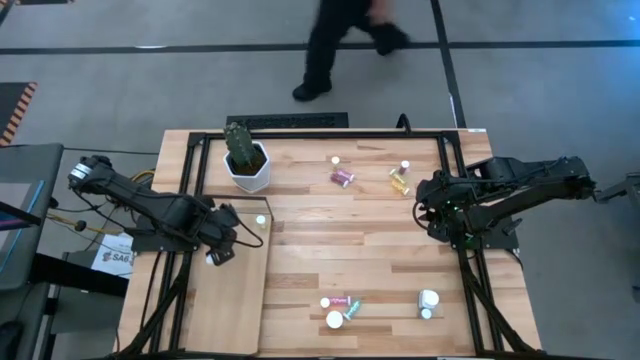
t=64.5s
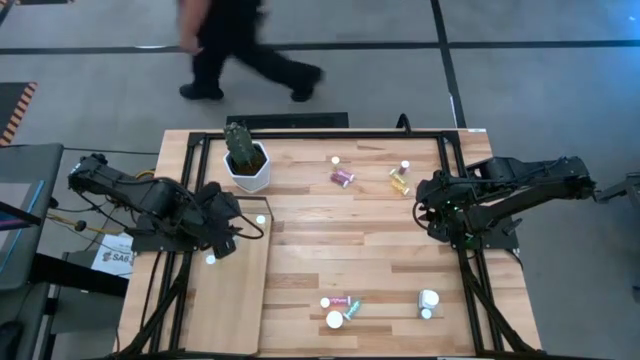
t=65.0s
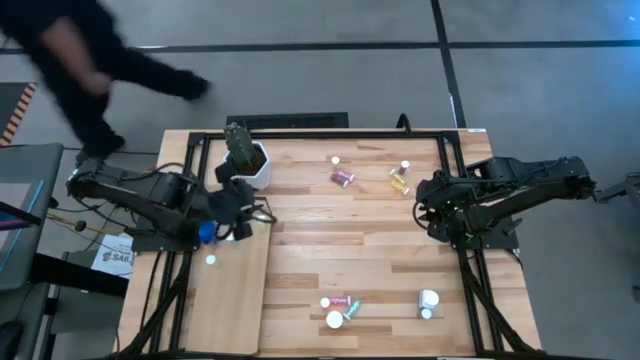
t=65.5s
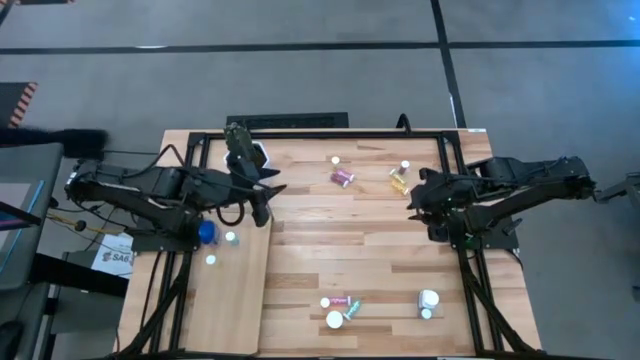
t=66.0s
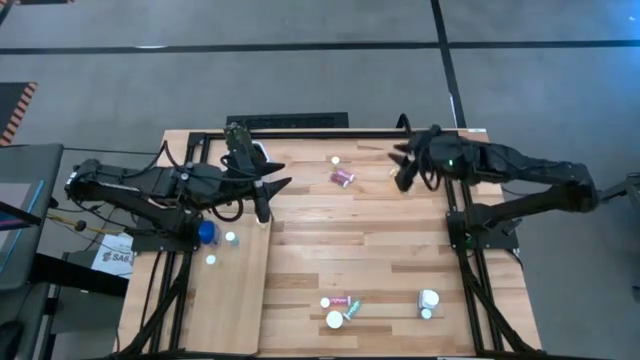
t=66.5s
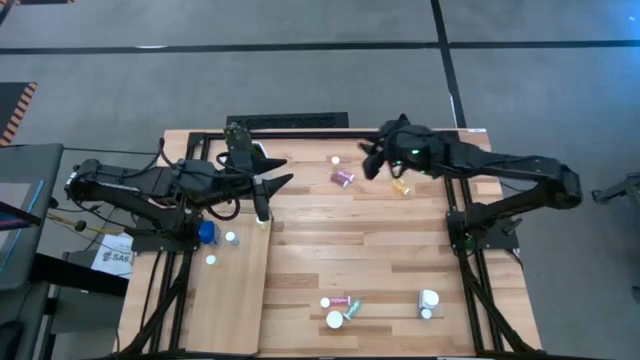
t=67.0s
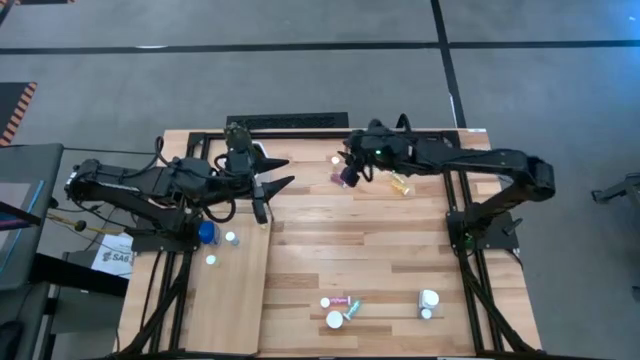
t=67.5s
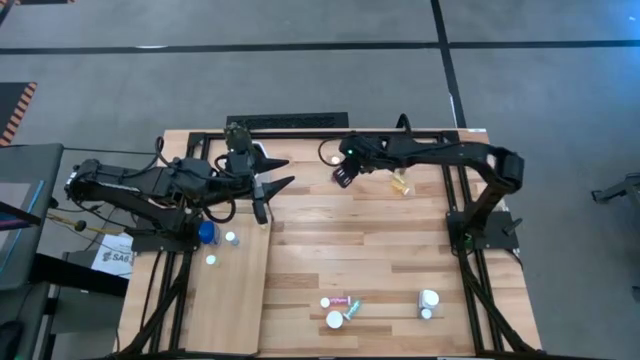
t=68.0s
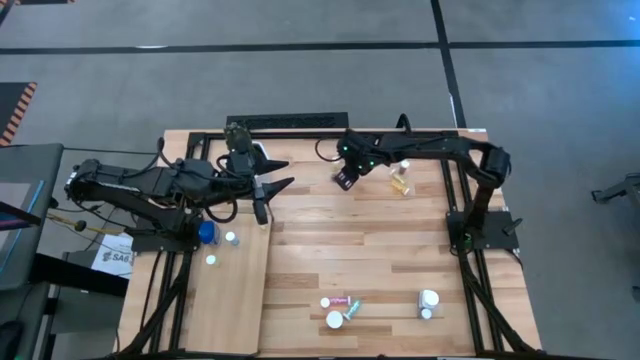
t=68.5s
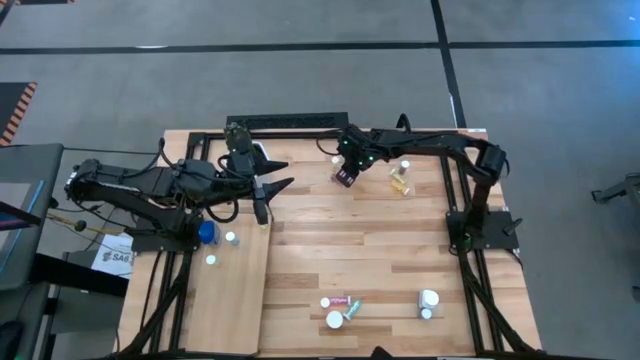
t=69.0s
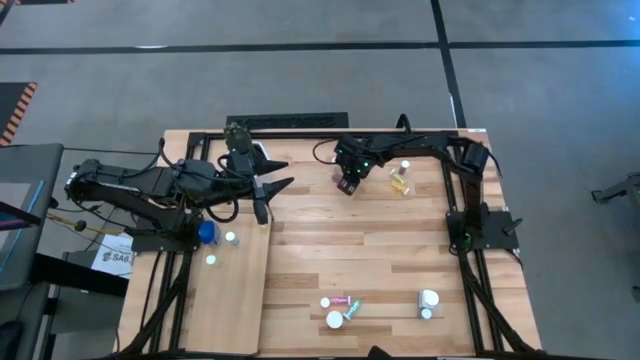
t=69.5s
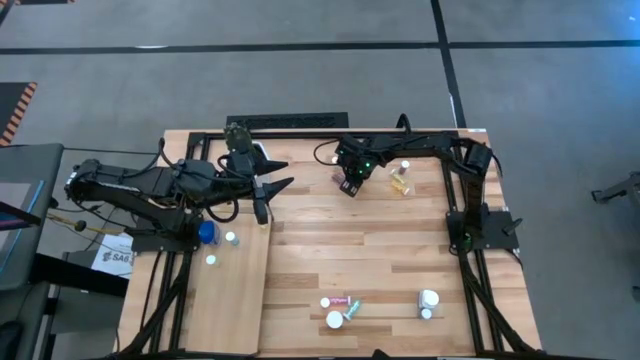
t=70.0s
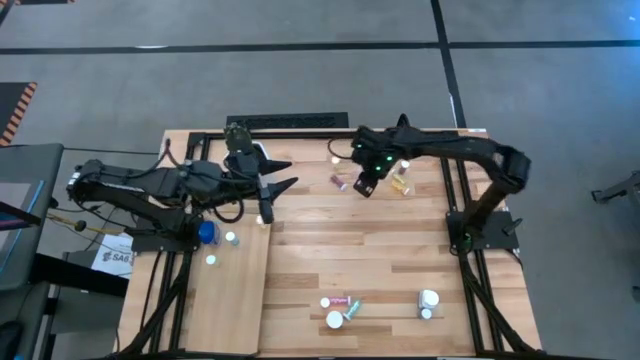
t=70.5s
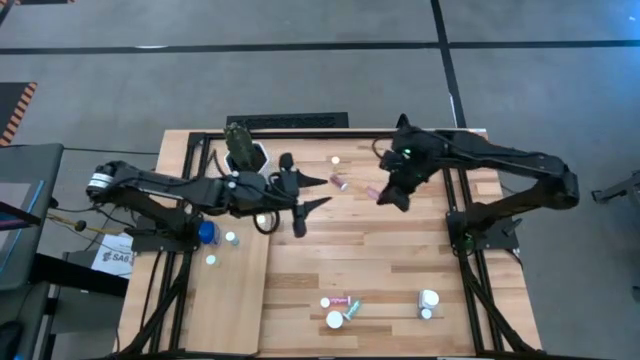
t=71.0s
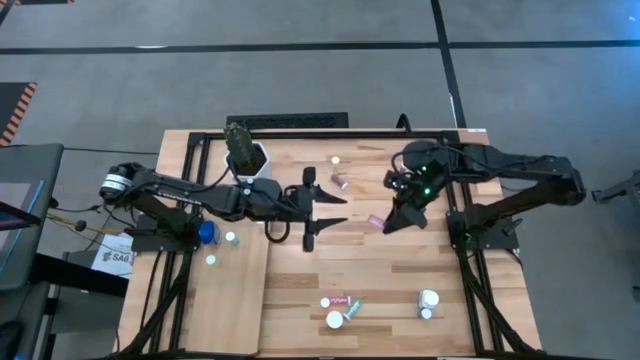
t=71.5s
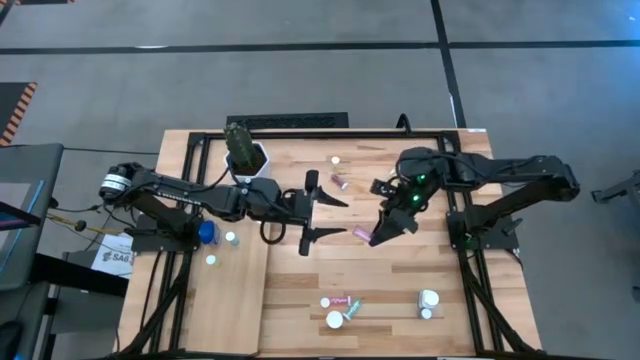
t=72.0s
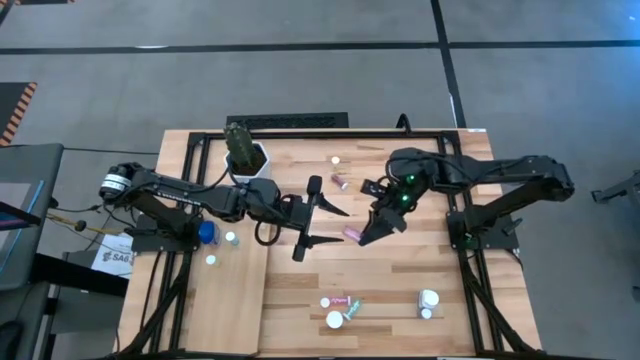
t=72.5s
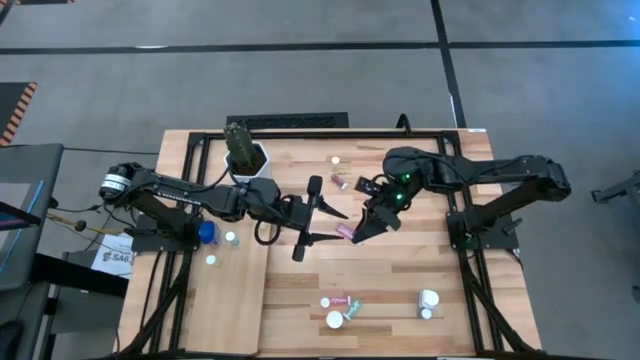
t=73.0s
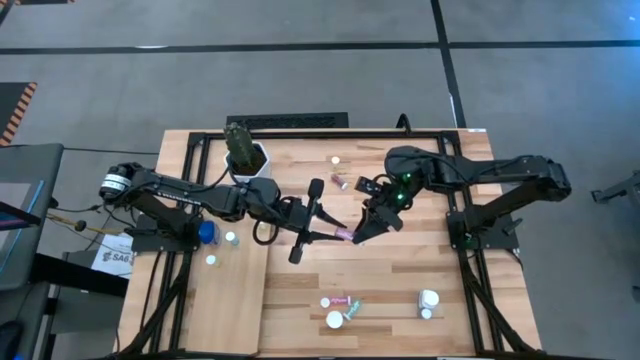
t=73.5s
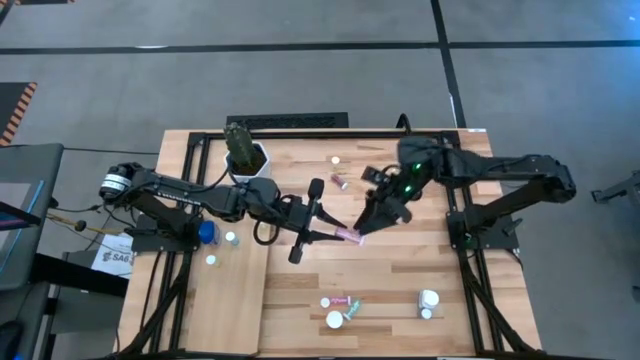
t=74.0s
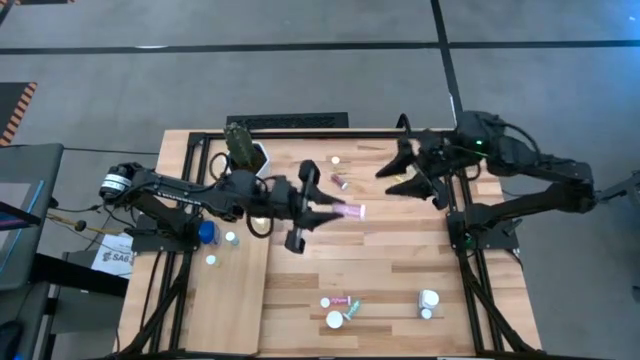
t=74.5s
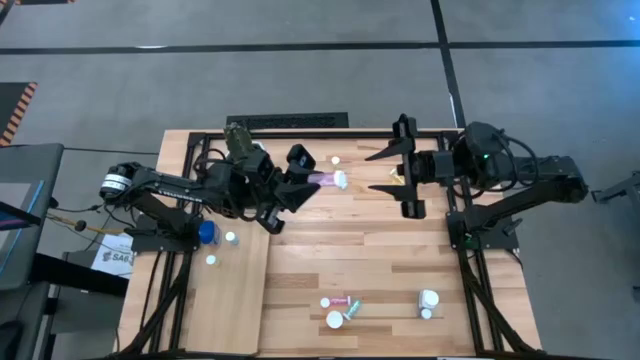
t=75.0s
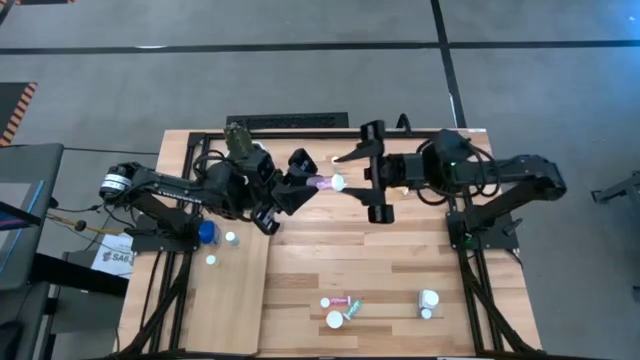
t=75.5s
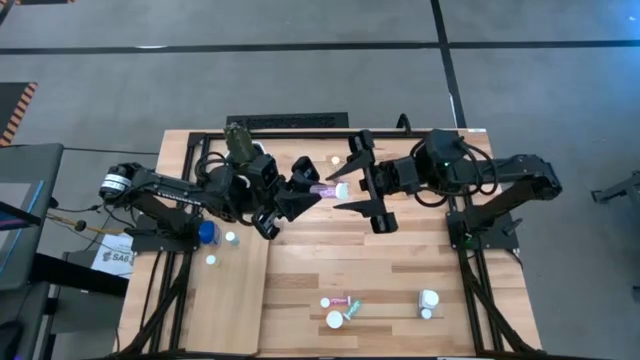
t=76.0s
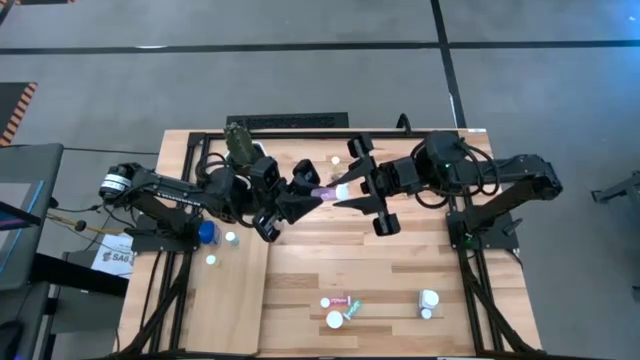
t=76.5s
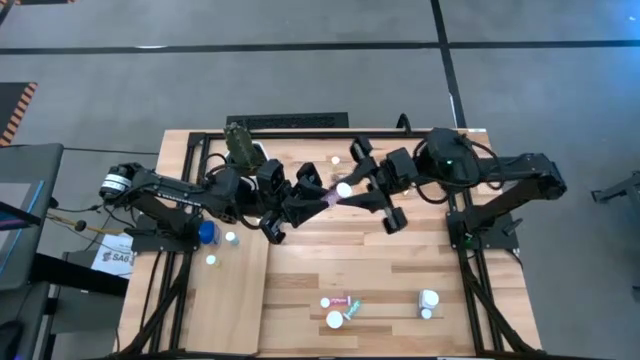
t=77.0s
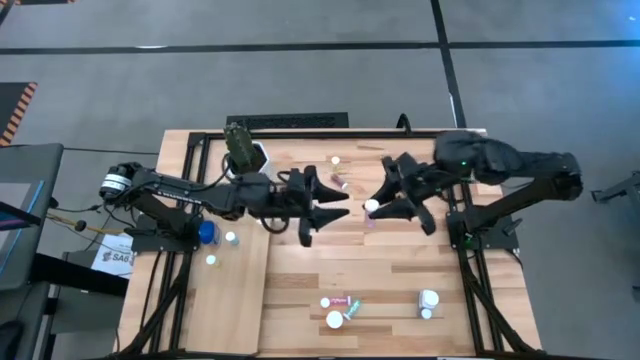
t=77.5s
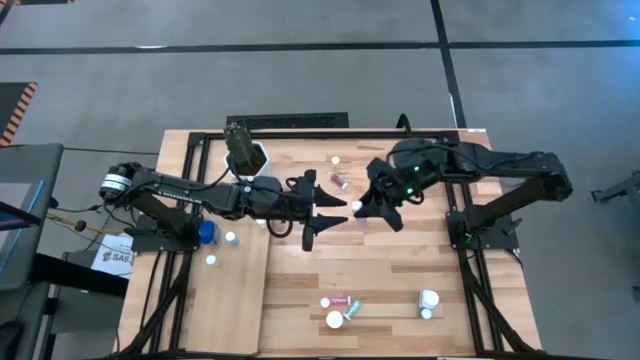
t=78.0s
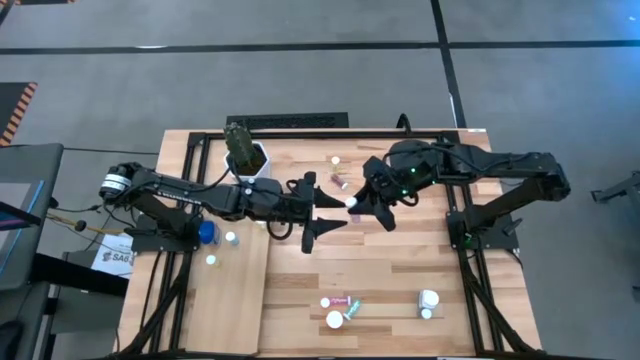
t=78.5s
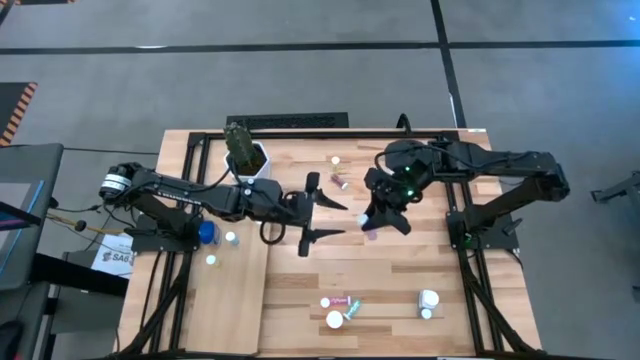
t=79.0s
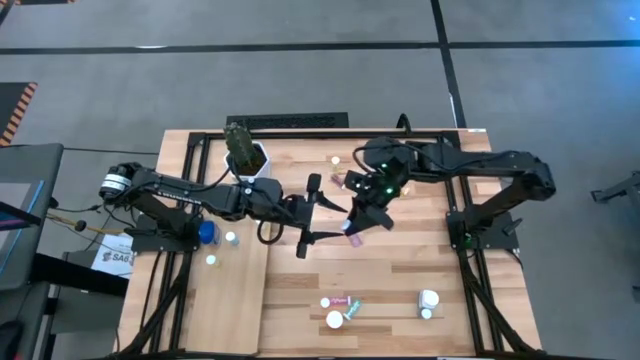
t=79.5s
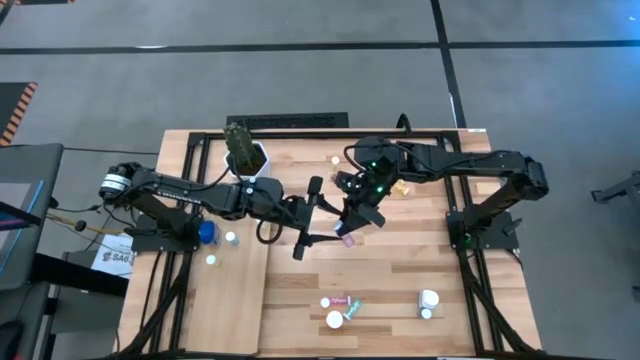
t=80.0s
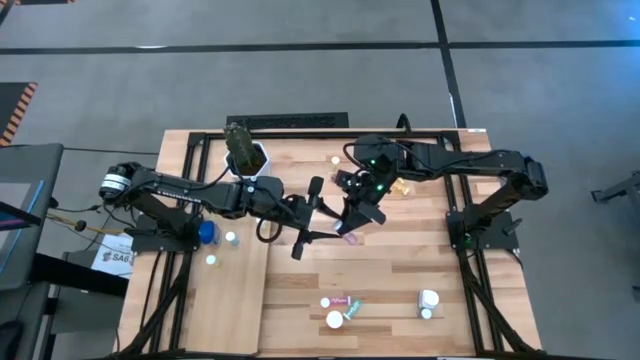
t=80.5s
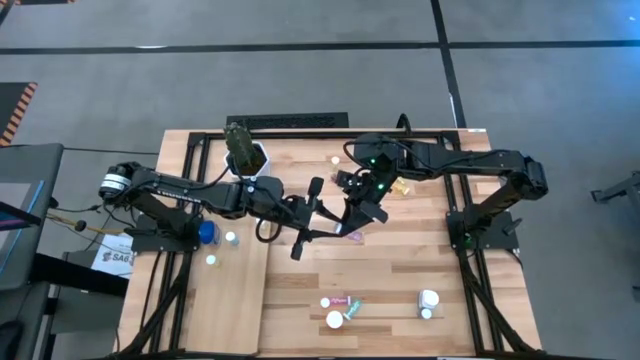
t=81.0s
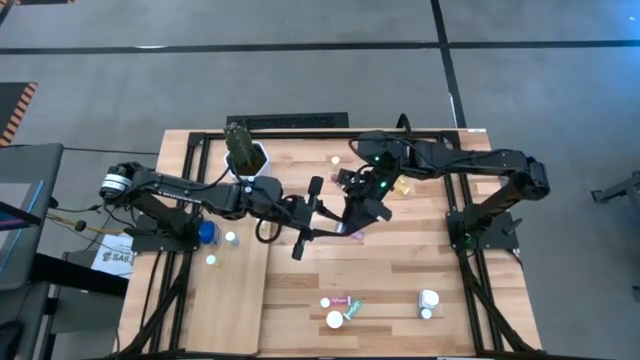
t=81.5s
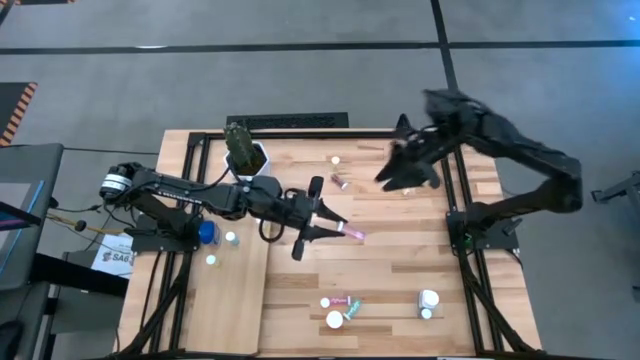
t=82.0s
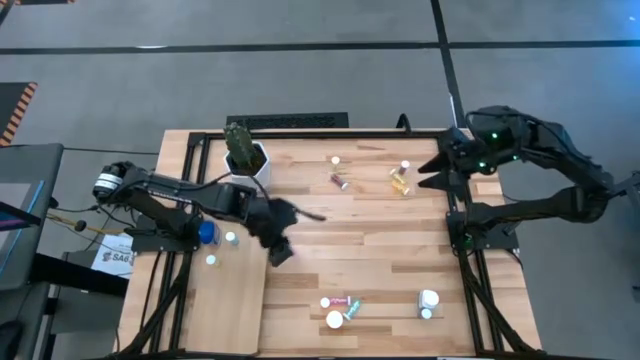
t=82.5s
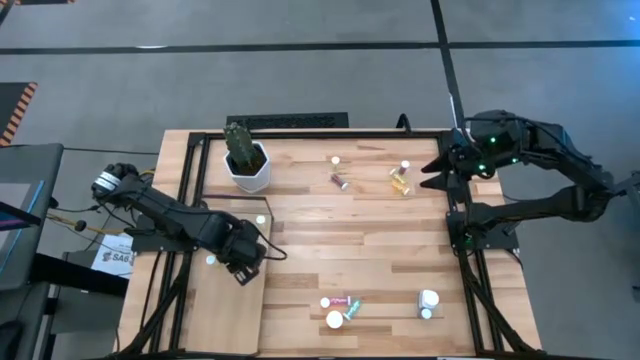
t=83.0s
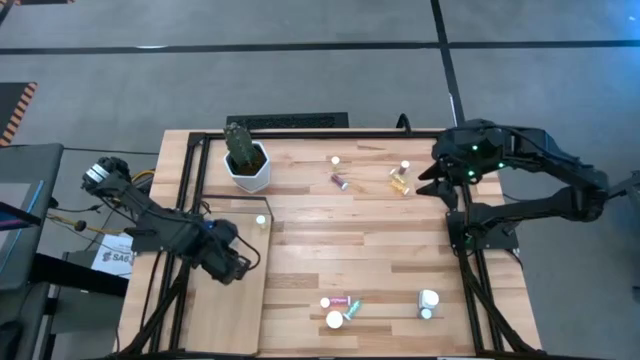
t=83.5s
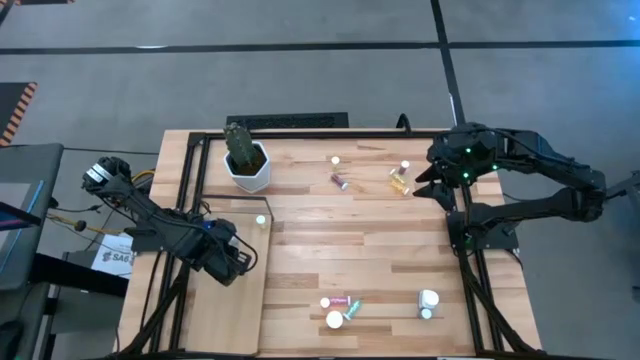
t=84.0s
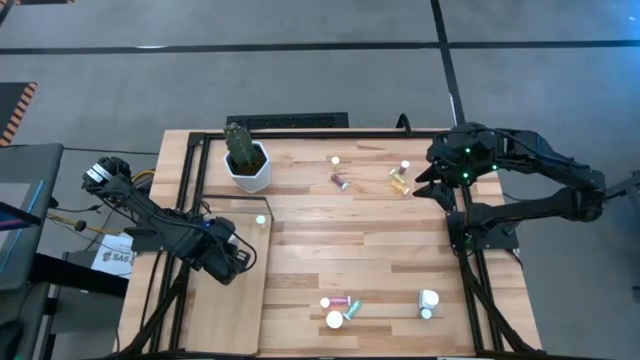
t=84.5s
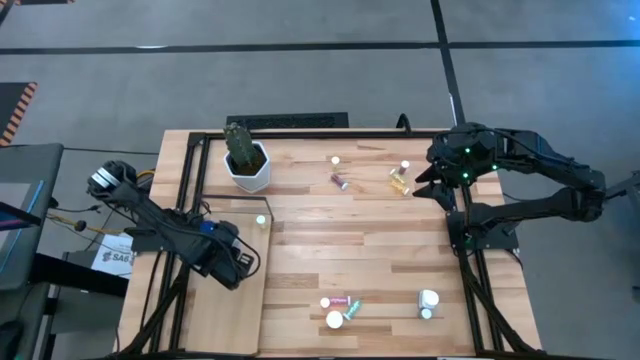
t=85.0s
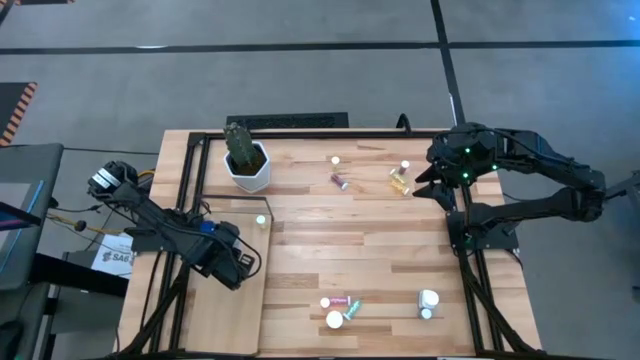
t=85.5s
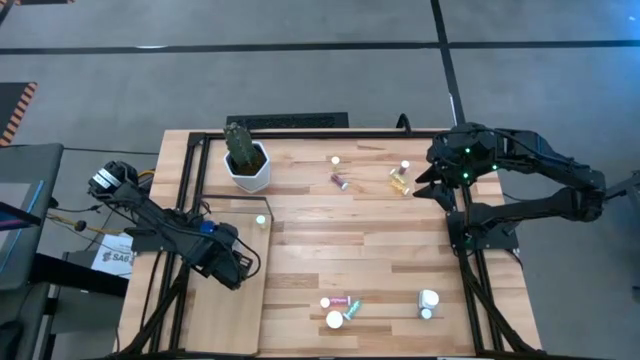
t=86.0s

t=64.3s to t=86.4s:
Task: Pick and place medicine bottles onto shelf by color
Put the top pink pill bottle on the shelf
